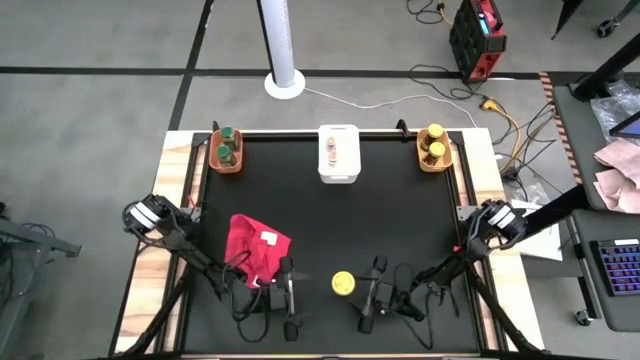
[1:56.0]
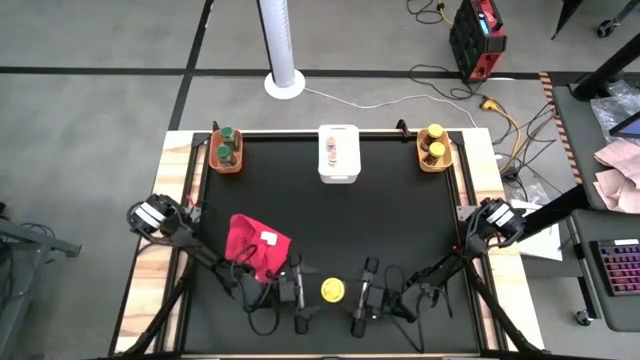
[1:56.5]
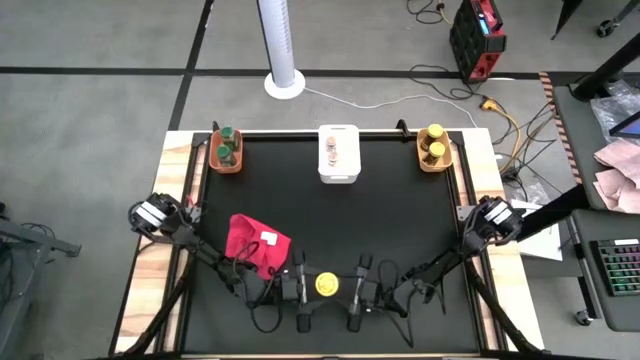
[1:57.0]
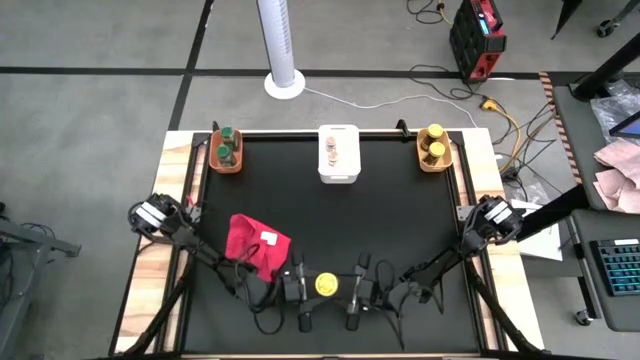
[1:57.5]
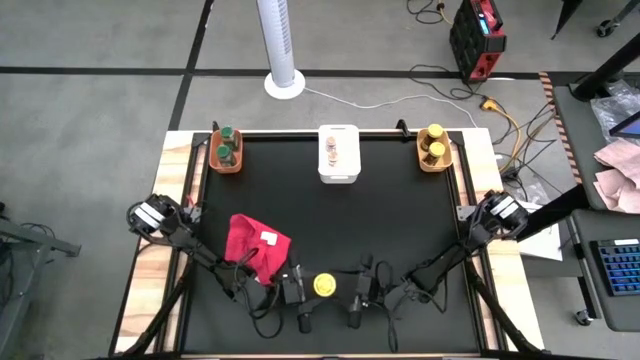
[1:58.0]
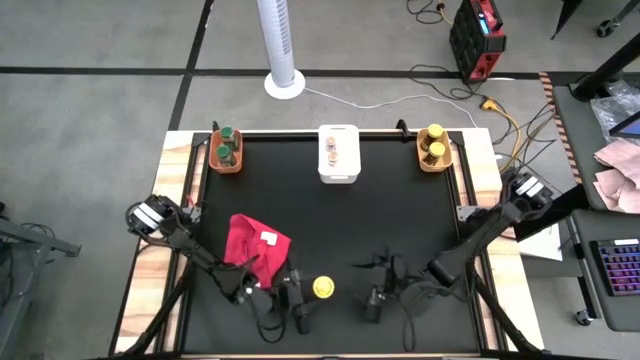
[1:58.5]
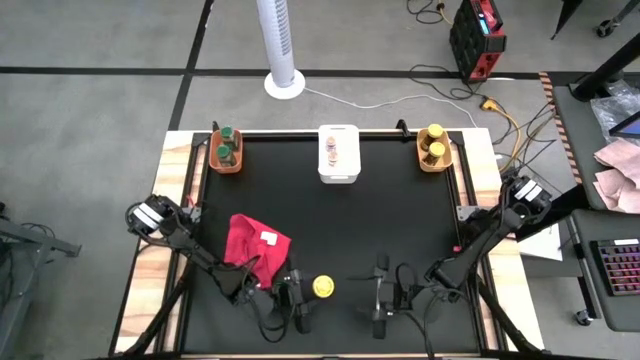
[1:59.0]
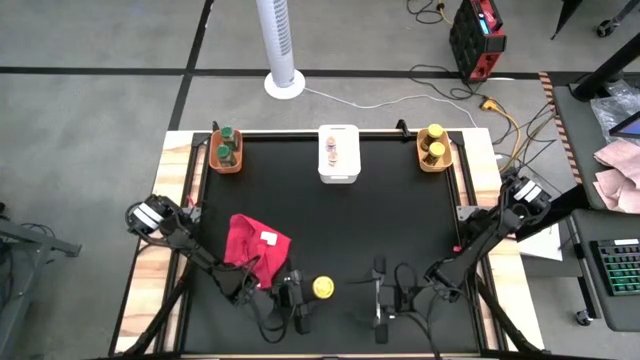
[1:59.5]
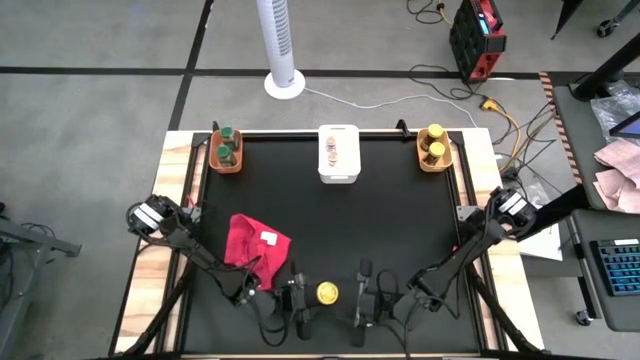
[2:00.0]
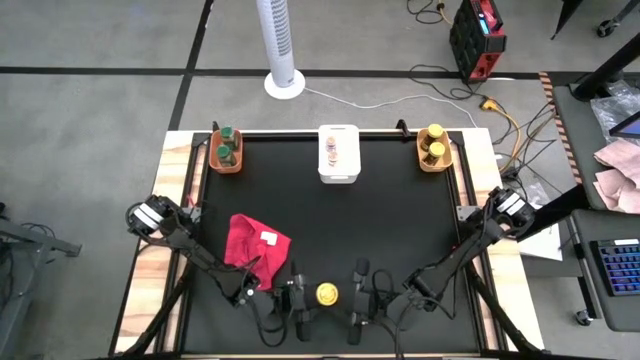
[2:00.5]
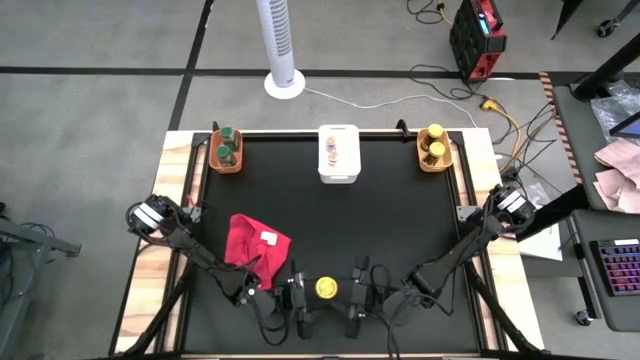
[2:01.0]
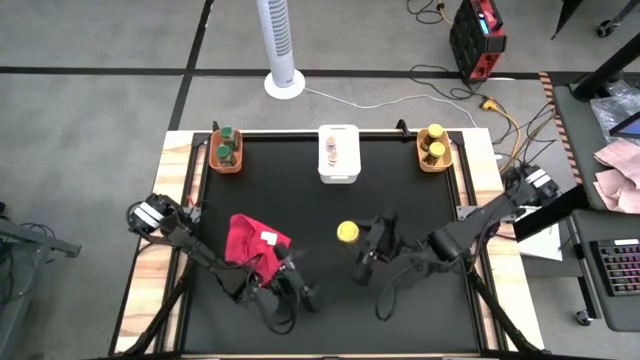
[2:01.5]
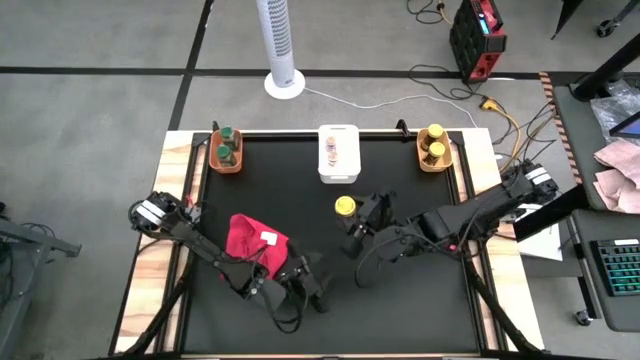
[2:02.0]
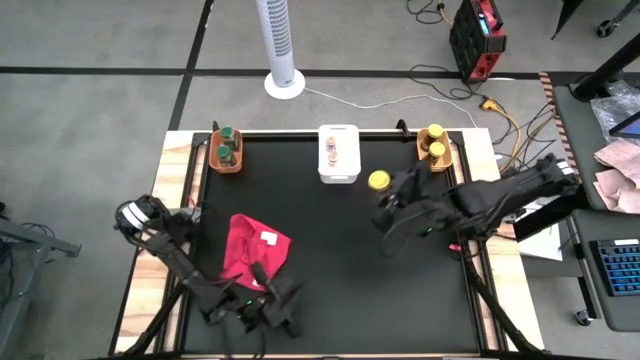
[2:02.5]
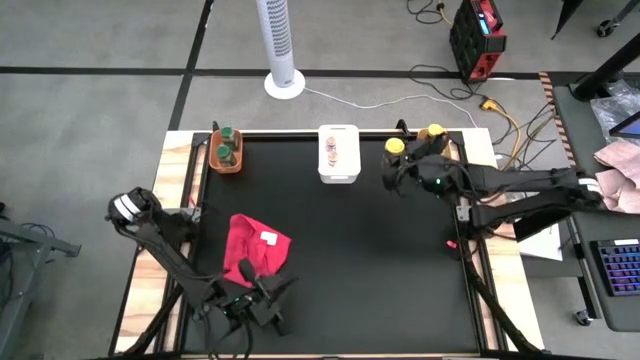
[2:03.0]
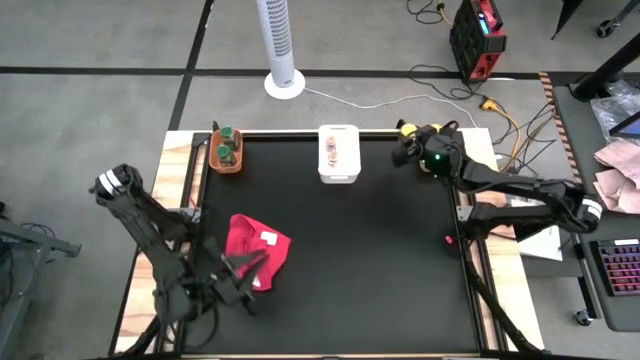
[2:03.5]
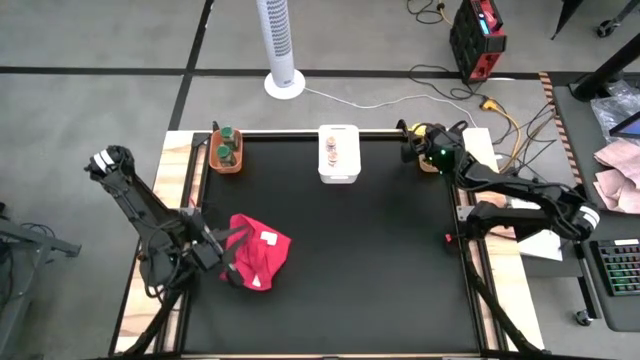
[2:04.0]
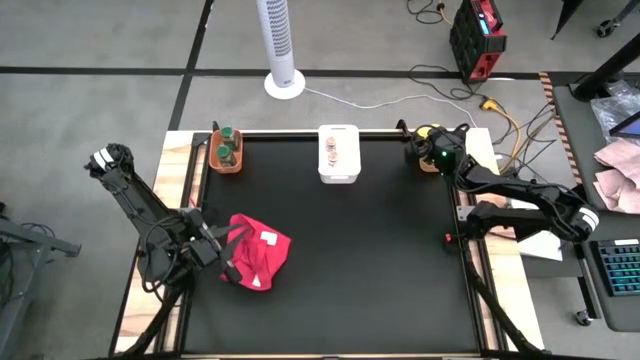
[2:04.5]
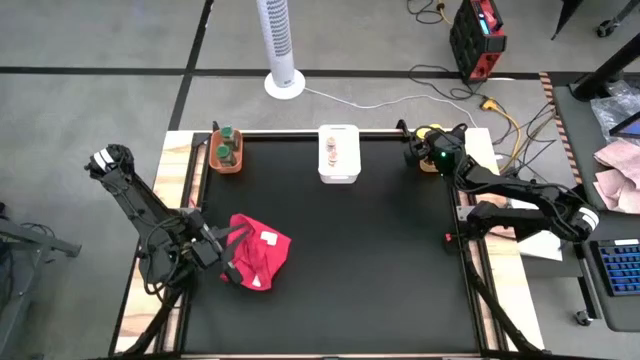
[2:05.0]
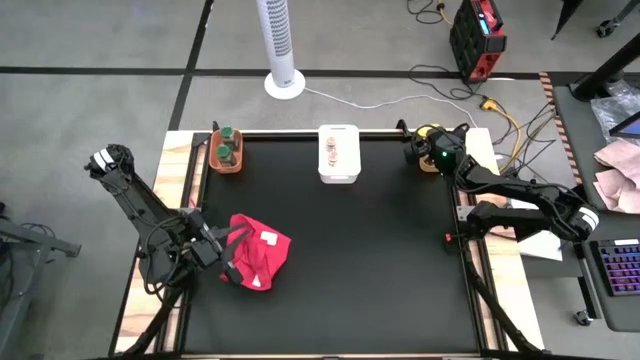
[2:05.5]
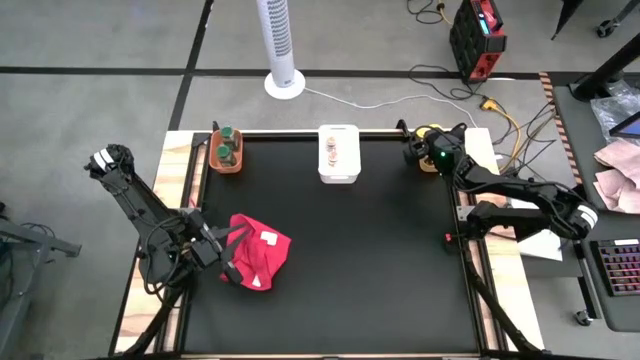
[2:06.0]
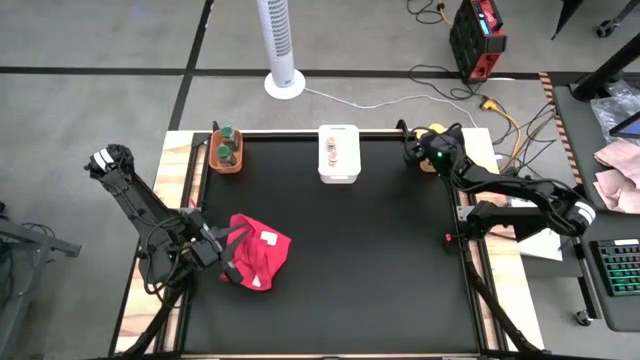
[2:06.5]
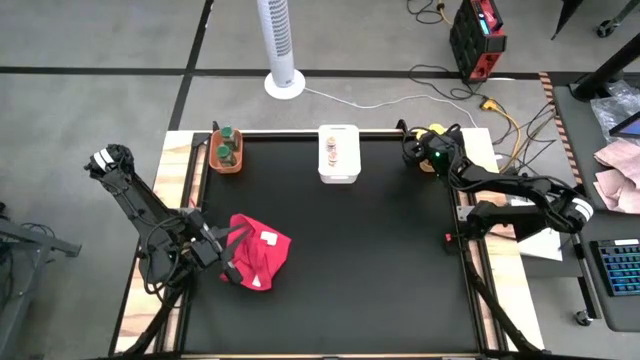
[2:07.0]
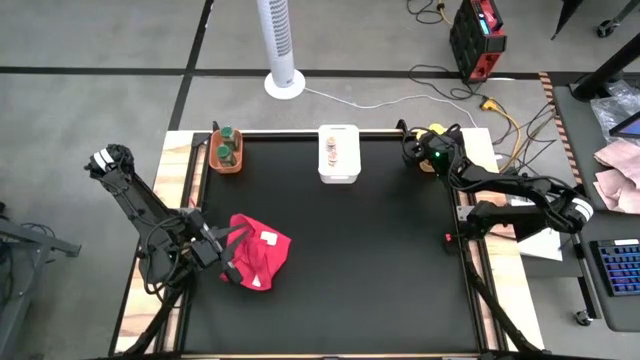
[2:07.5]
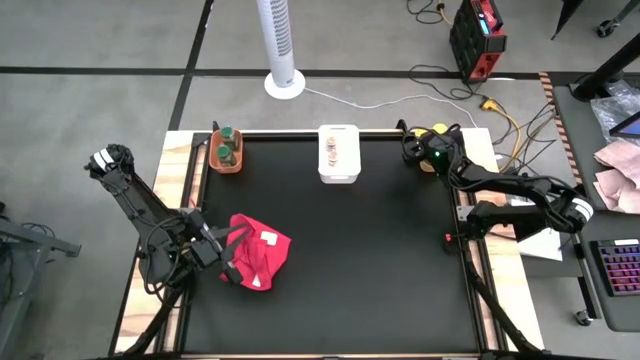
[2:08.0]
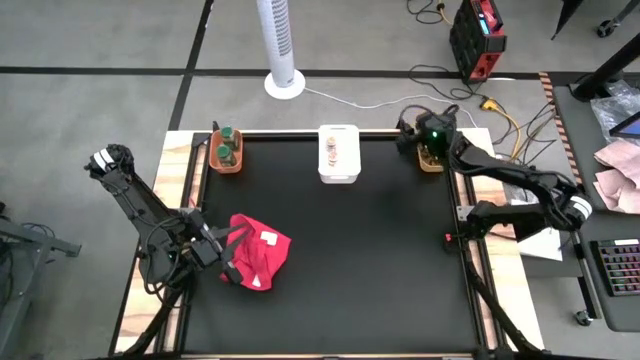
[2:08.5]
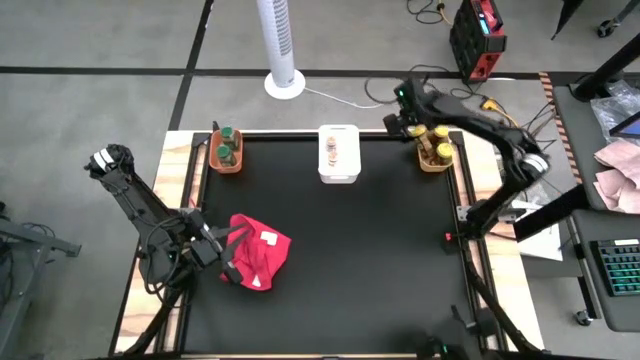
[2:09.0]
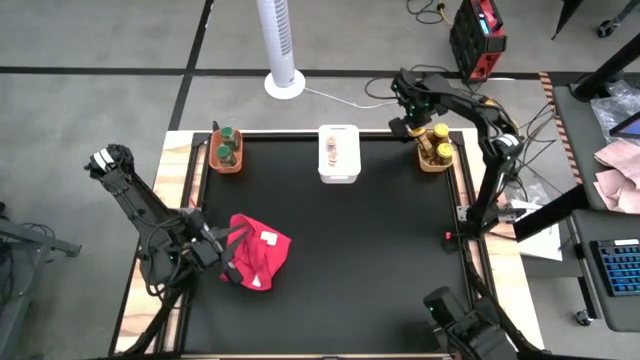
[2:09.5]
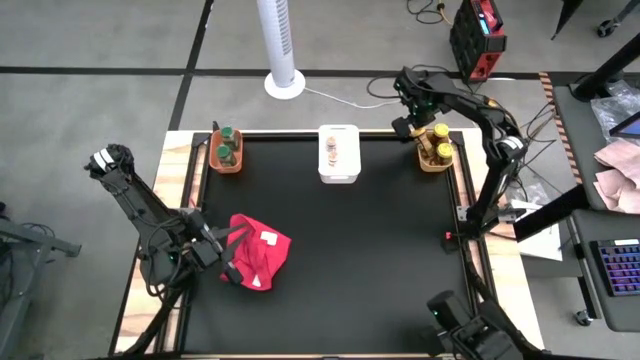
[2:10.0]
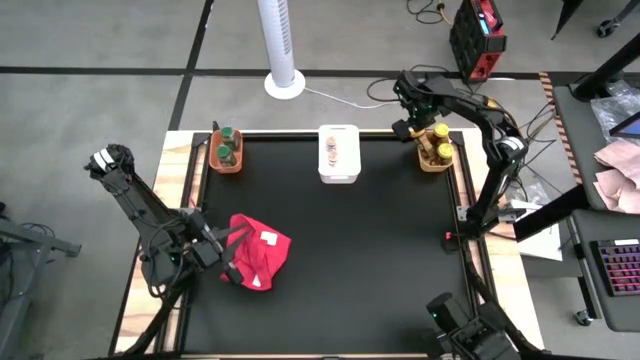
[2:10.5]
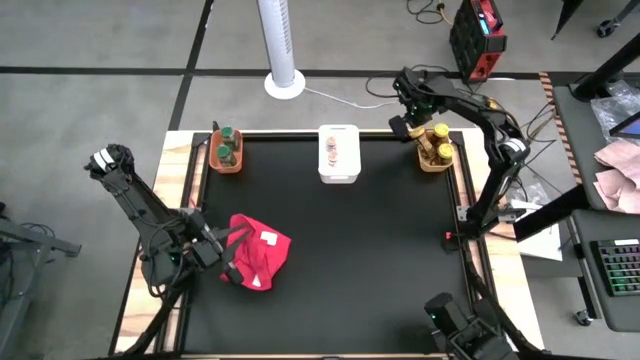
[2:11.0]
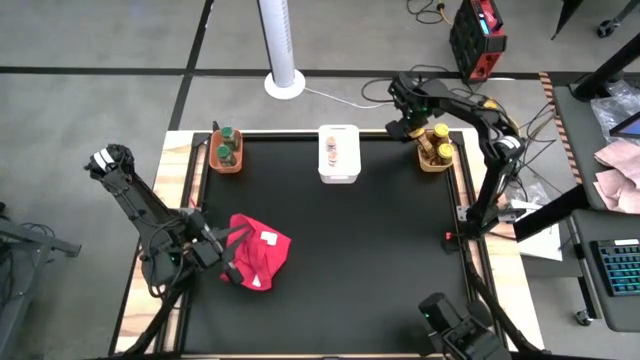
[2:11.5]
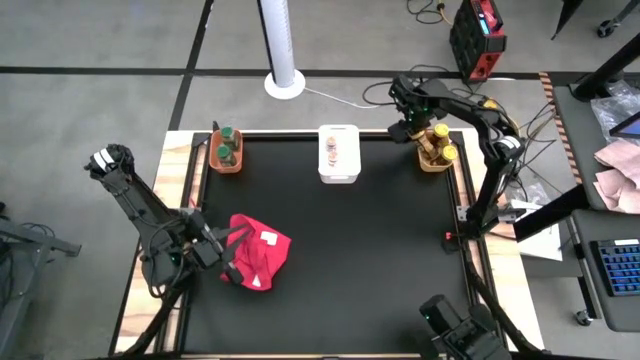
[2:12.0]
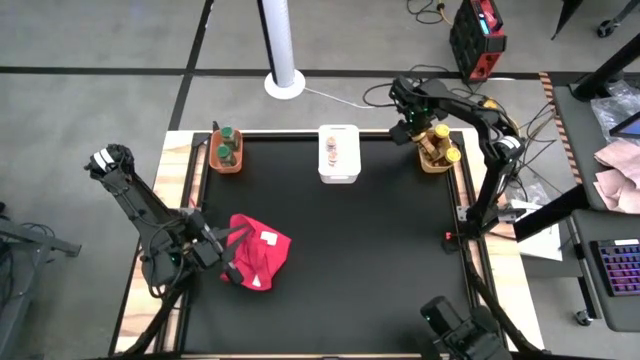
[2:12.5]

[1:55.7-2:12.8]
Task: Sort spices by type
Put the yellow seasoning bottle into the yellow bin

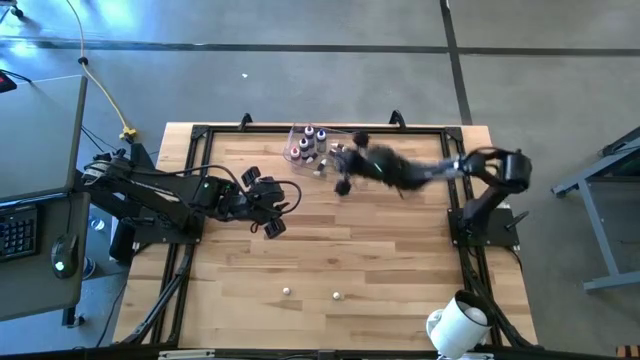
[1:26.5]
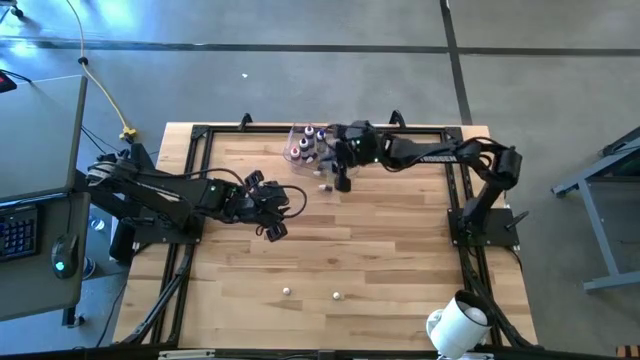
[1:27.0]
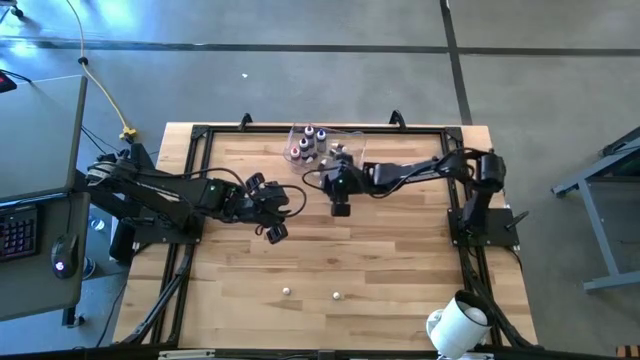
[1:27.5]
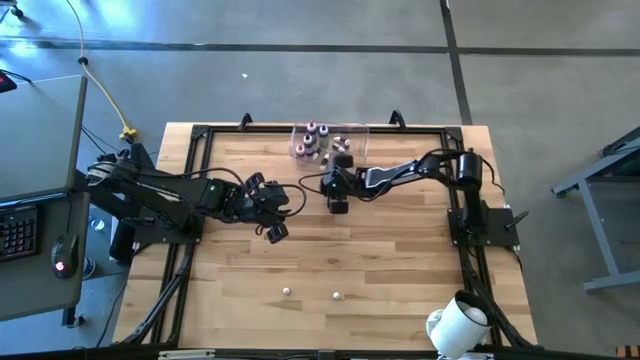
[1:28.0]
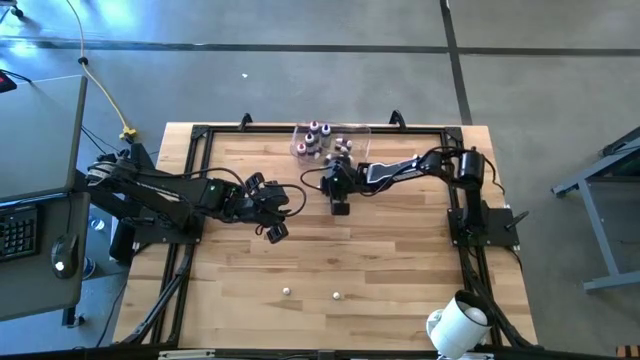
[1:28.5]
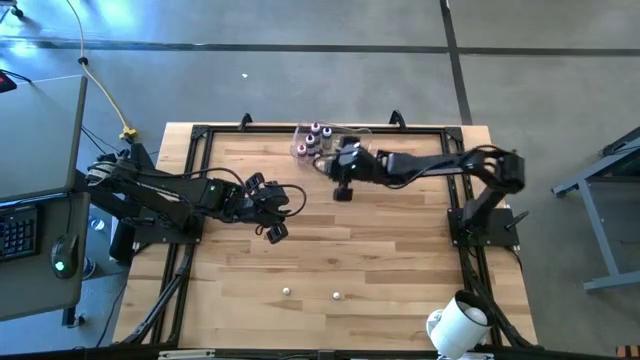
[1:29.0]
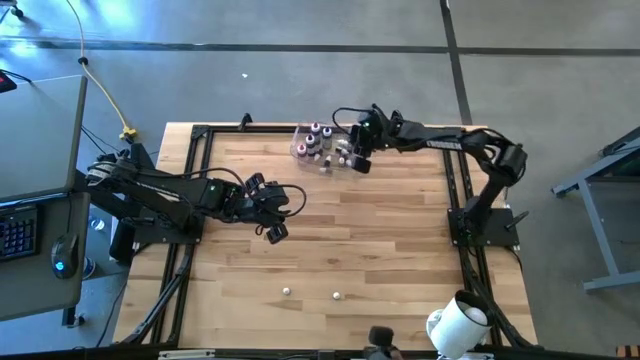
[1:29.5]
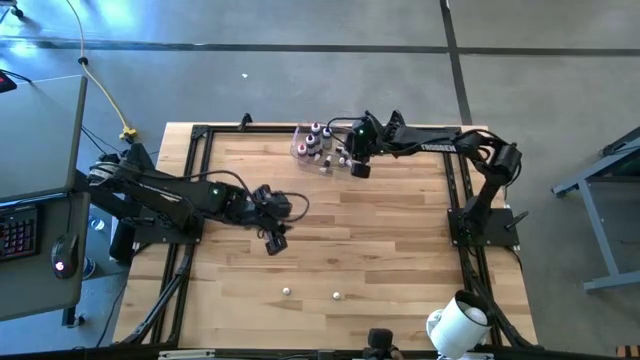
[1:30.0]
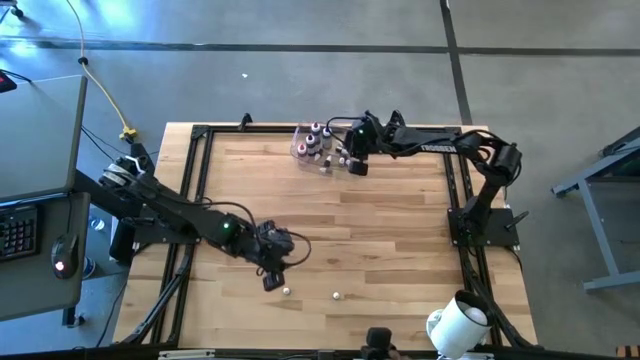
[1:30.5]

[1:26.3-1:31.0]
Task: Pick & Place food coloring
Put the purple food coloring into the transparent bin
